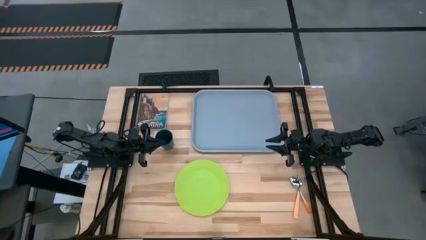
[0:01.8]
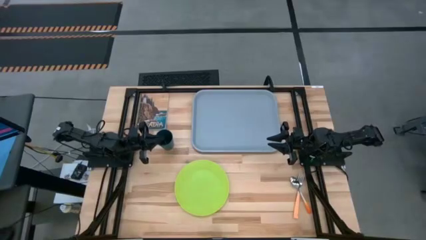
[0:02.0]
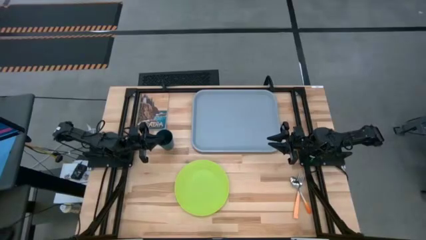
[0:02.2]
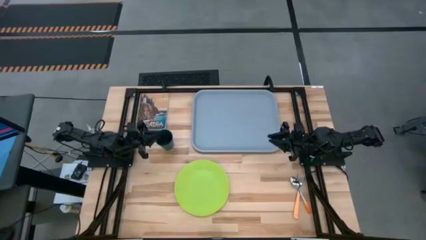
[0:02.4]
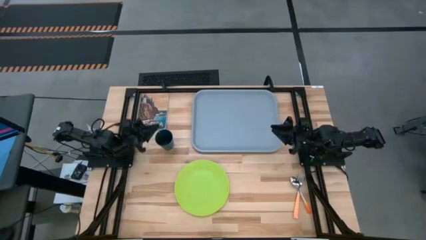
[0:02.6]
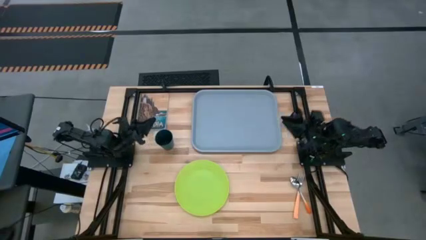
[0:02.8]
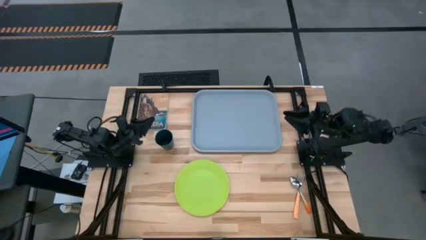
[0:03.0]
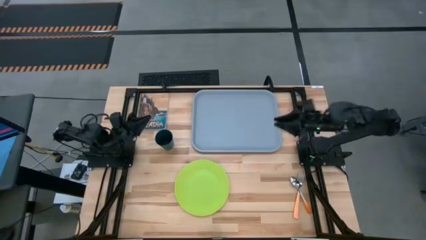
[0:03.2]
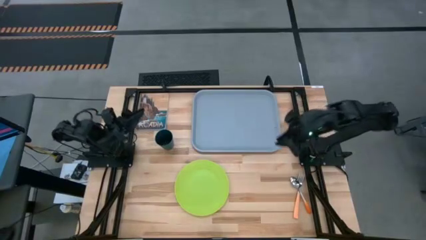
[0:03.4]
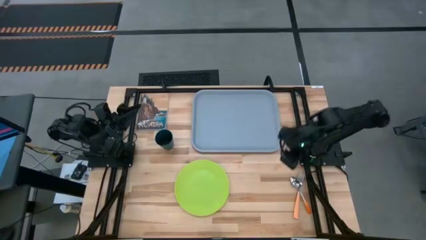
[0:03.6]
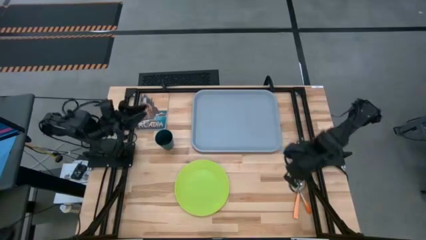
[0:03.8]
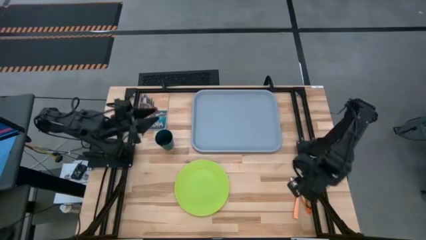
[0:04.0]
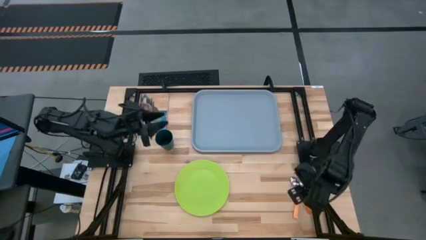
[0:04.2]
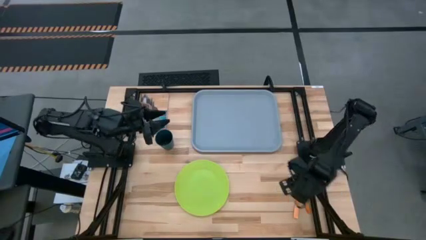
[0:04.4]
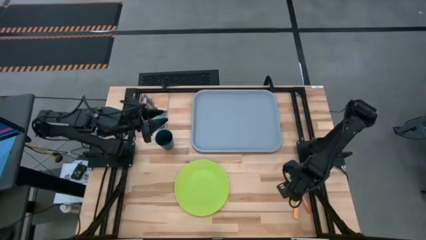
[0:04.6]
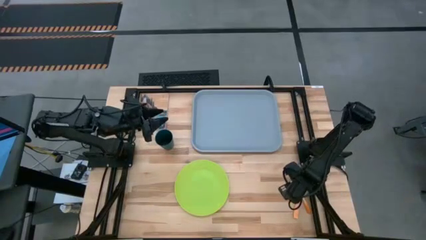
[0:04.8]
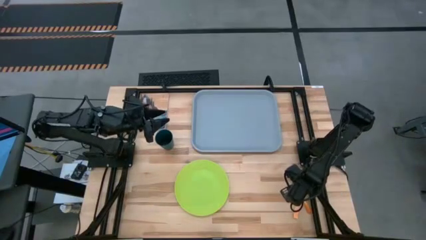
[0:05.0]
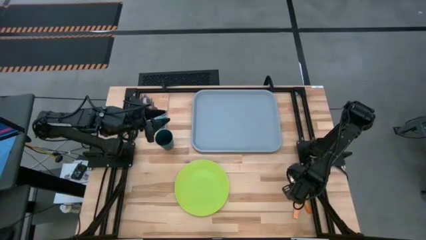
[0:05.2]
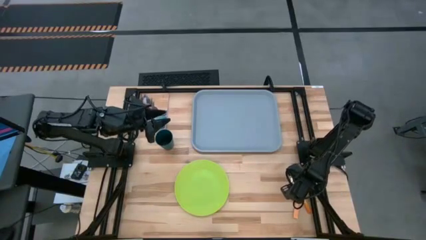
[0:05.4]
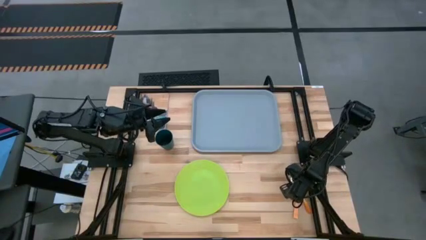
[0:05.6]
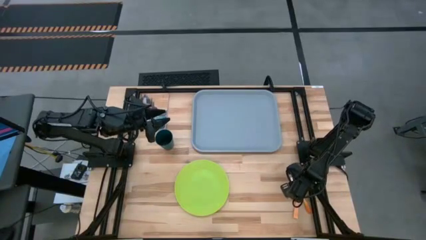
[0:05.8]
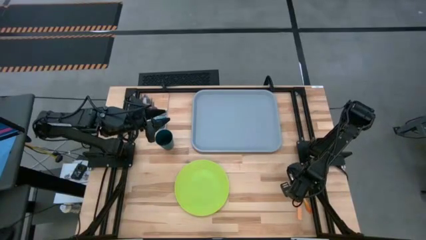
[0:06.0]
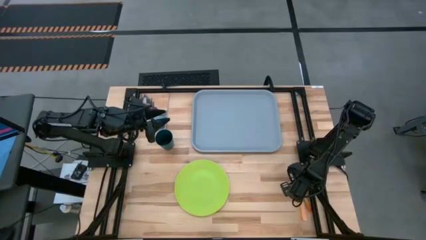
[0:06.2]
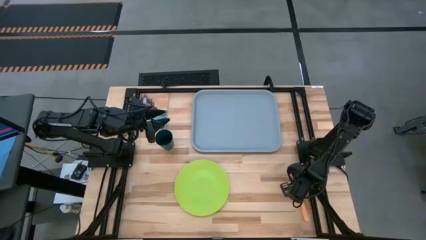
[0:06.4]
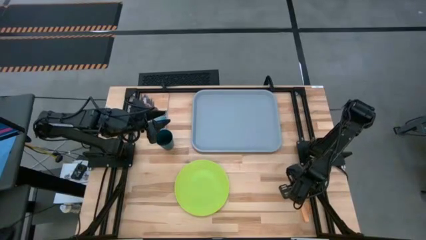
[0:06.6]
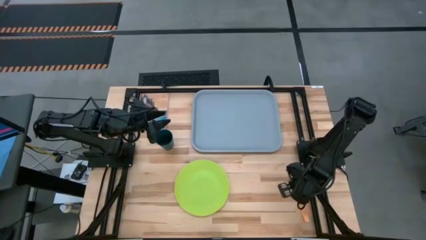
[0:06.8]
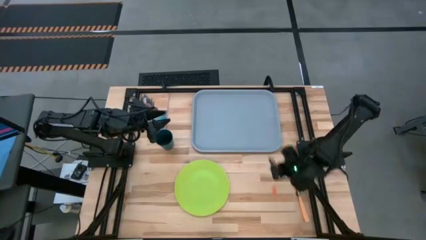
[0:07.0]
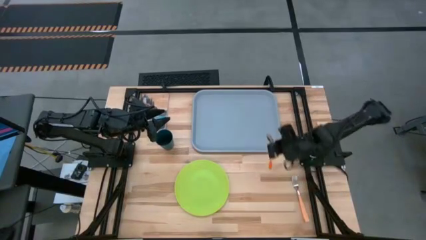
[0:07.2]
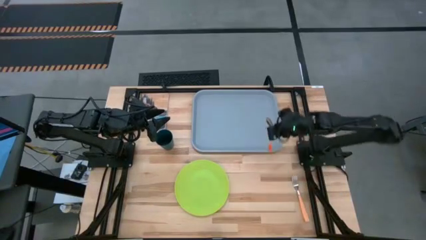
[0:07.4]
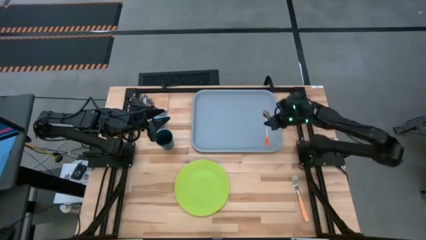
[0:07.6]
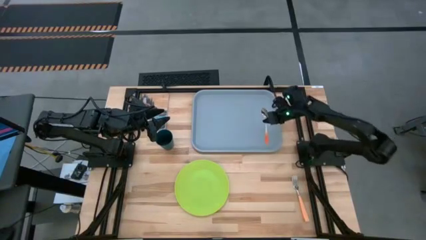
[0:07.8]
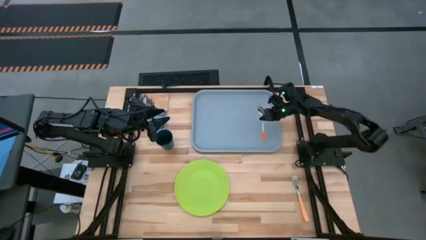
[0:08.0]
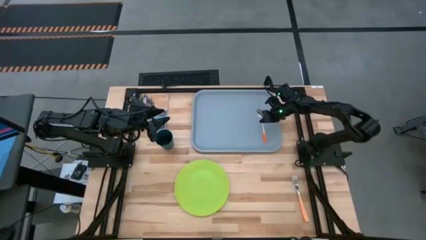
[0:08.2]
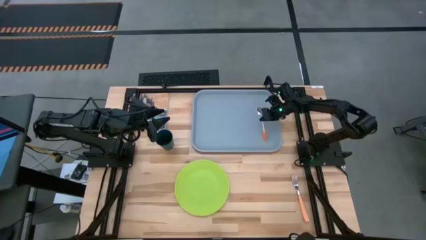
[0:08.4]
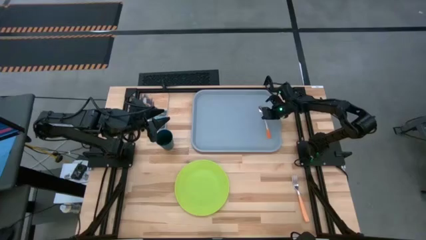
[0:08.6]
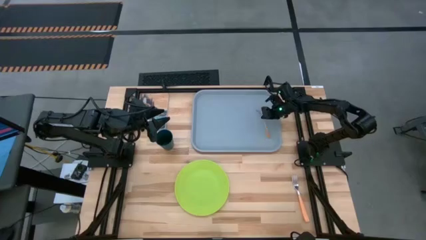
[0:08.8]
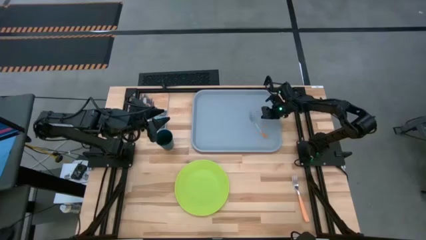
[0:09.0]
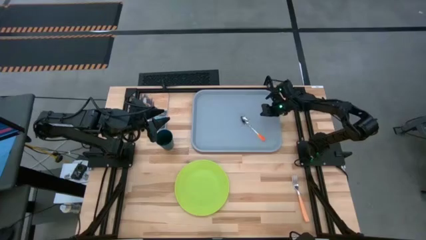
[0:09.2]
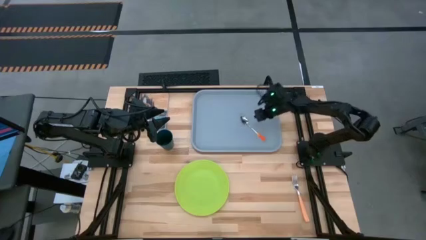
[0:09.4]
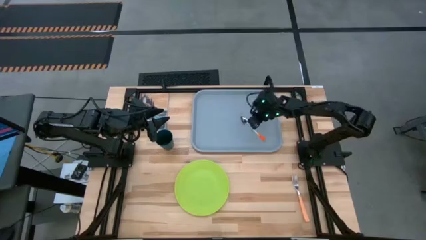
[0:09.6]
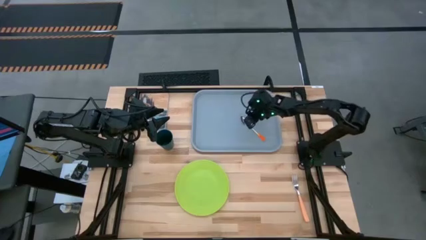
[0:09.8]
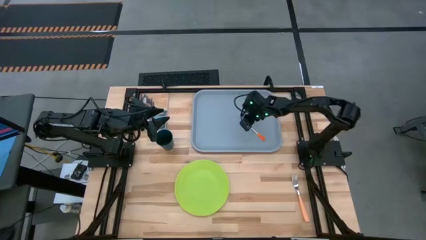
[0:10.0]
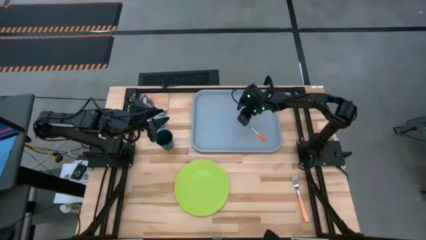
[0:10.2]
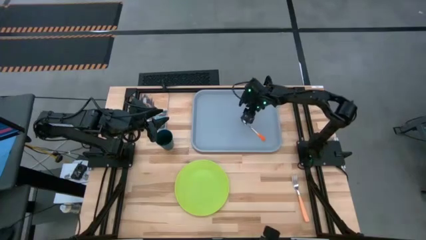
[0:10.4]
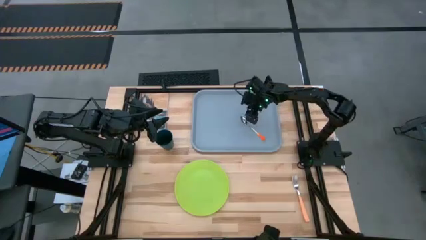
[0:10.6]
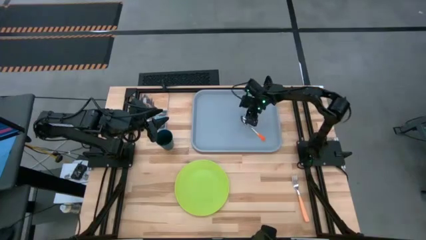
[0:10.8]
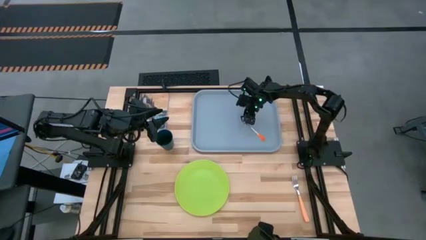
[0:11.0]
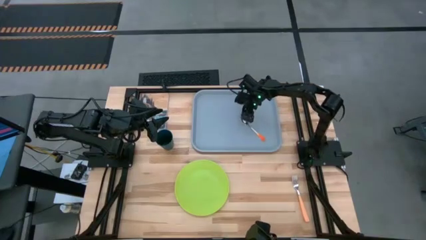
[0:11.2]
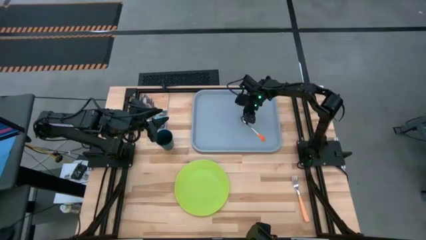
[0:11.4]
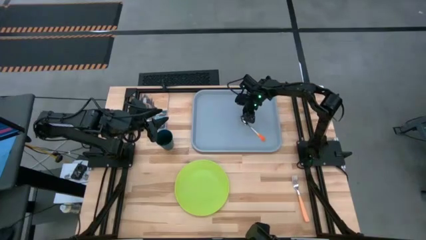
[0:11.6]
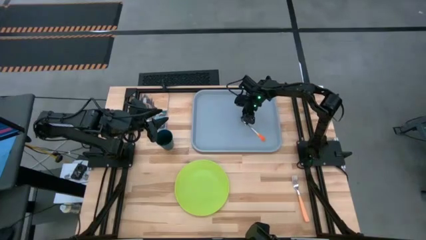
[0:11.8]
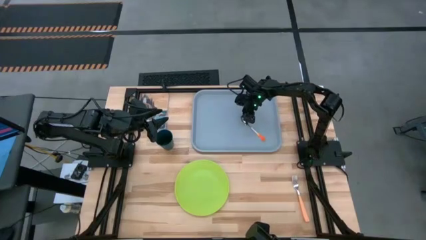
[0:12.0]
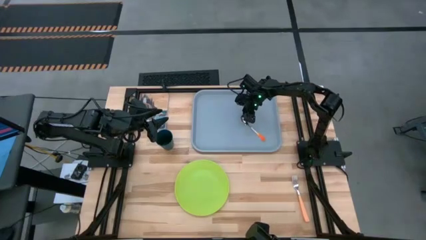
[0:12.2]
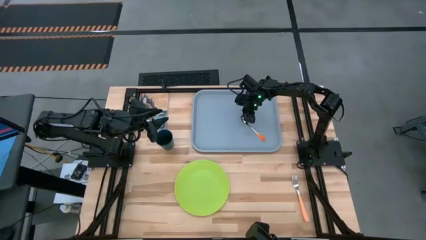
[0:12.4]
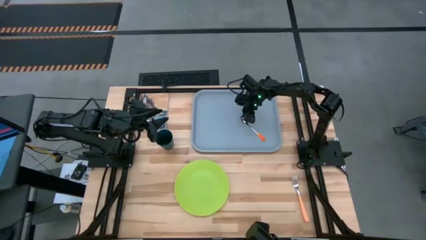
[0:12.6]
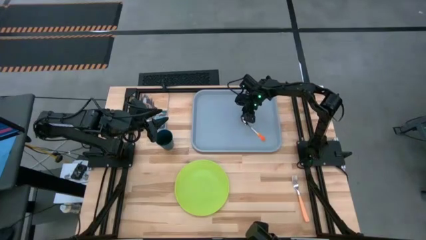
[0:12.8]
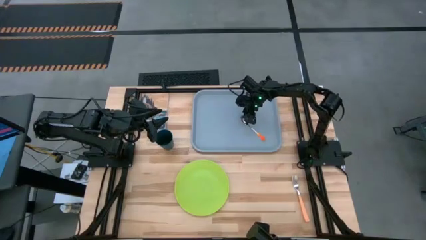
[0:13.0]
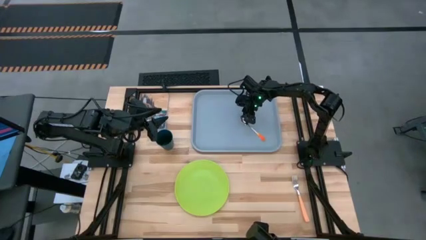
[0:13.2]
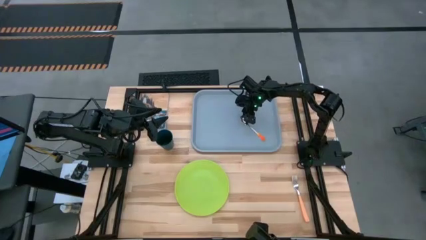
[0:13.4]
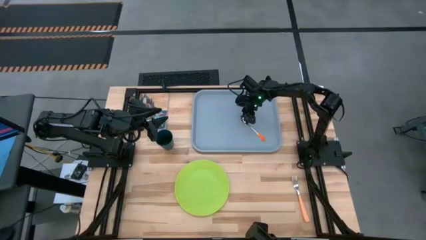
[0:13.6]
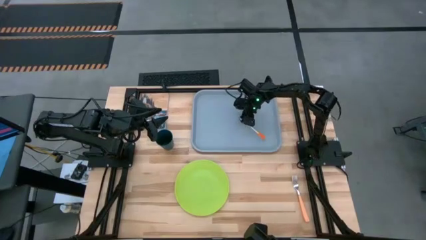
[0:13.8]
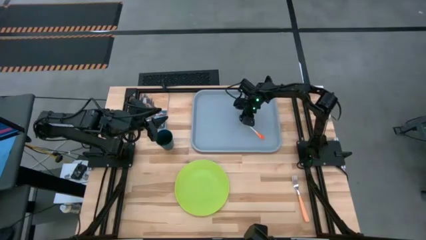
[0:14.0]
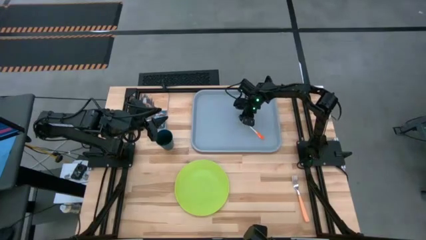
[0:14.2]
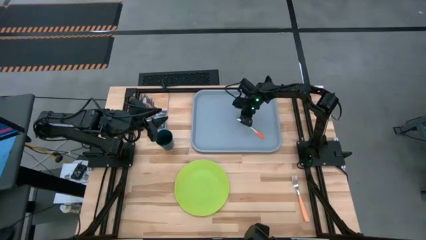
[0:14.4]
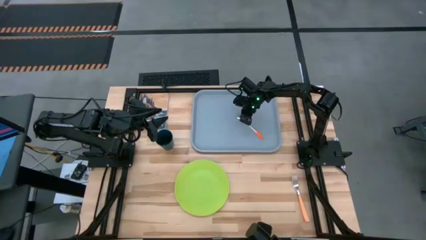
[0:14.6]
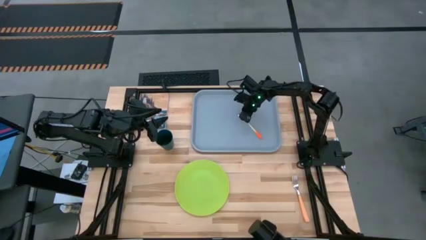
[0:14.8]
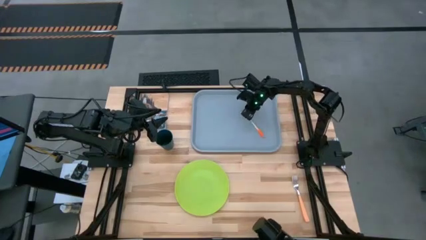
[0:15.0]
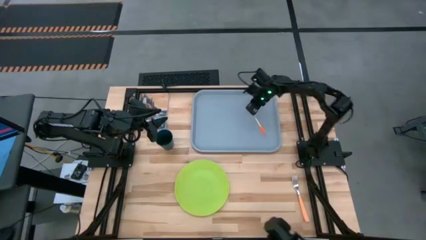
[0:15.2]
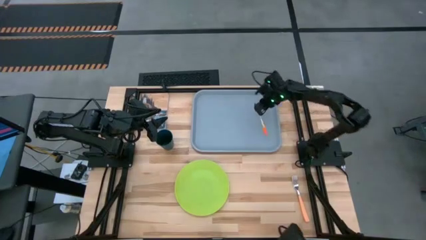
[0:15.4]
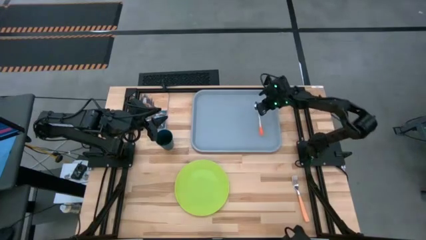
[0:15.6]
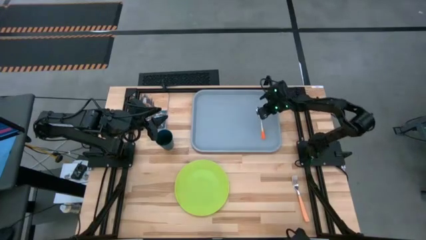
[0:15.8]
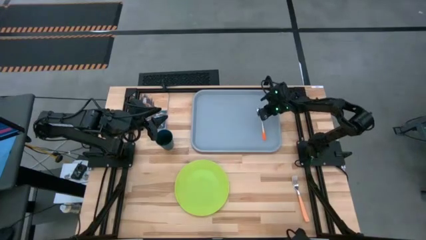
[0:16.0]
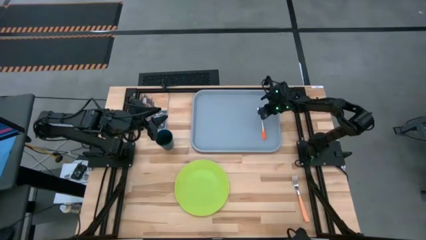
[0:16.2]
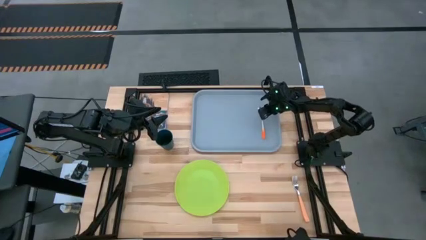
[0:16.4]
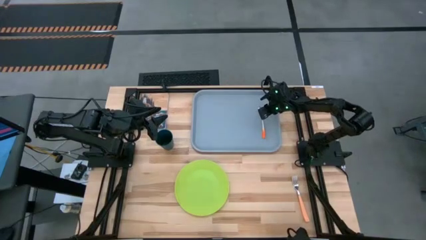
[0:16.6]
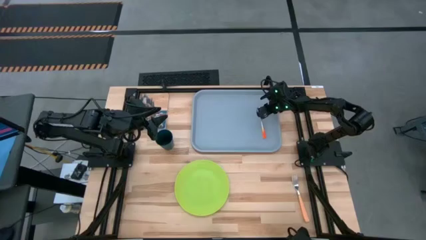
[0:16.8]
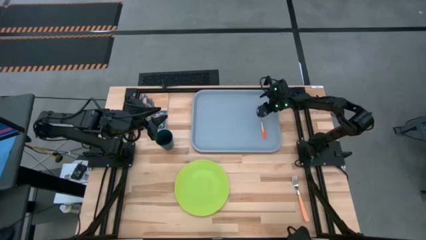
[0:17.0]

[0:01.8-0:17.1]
Task: Pick and place plate/cup/fork/spoon on tray
Put the orange spoon to the right of the gray tray
